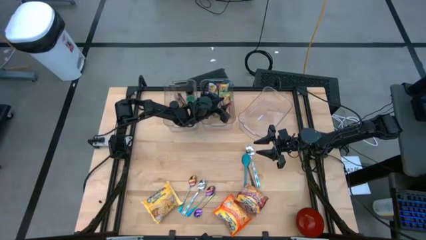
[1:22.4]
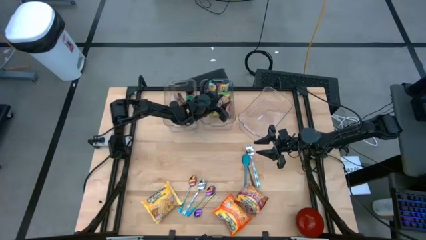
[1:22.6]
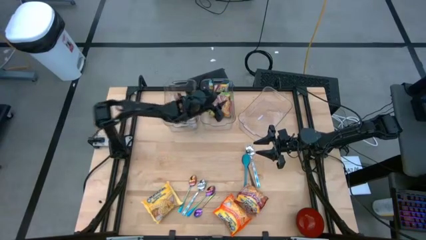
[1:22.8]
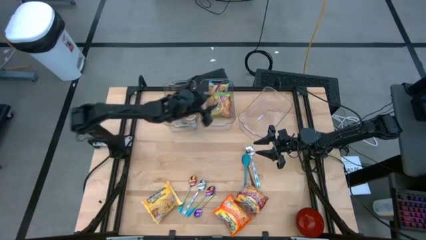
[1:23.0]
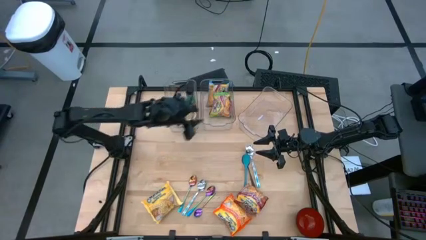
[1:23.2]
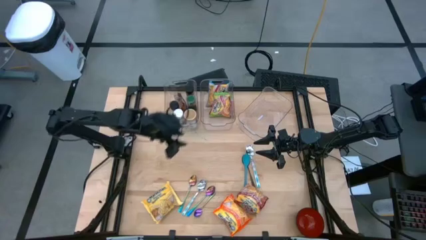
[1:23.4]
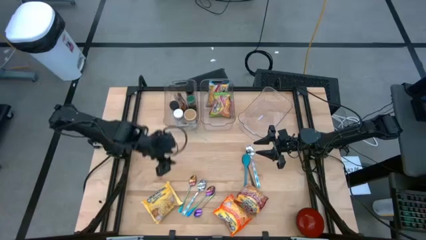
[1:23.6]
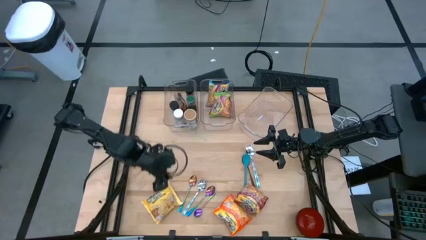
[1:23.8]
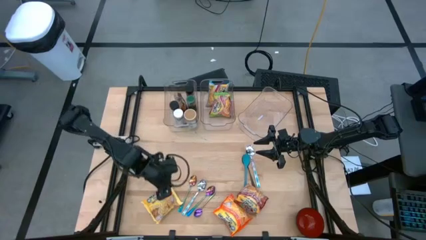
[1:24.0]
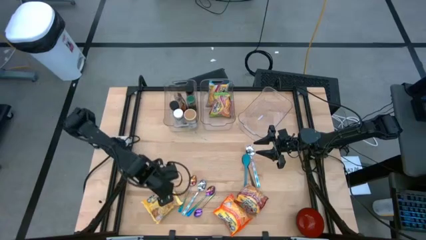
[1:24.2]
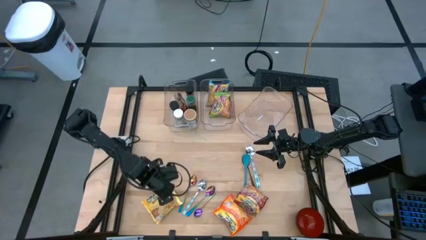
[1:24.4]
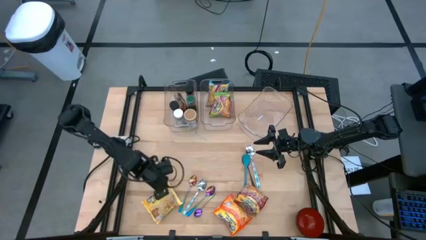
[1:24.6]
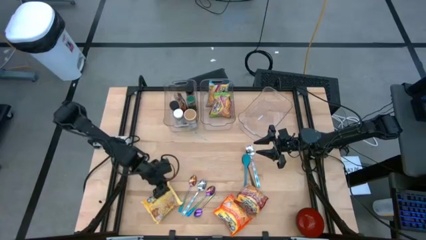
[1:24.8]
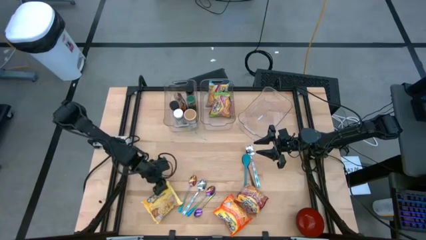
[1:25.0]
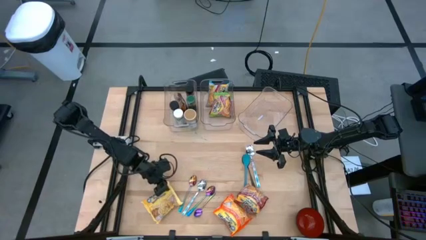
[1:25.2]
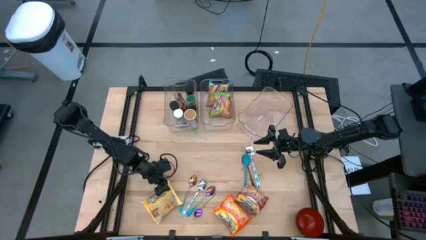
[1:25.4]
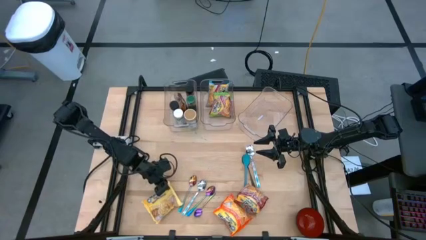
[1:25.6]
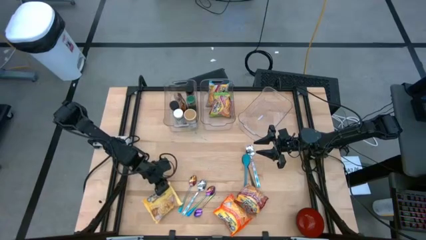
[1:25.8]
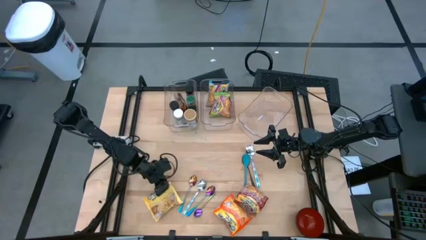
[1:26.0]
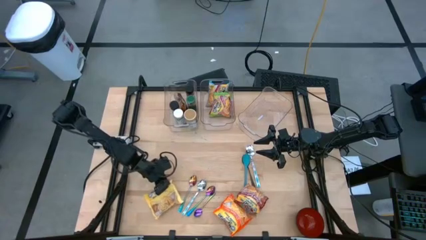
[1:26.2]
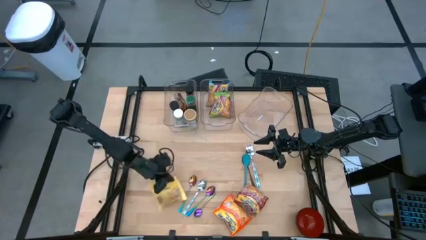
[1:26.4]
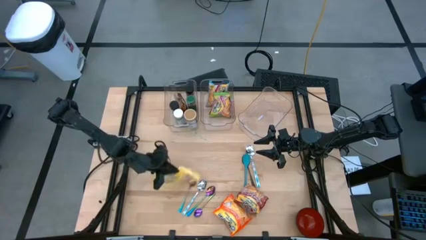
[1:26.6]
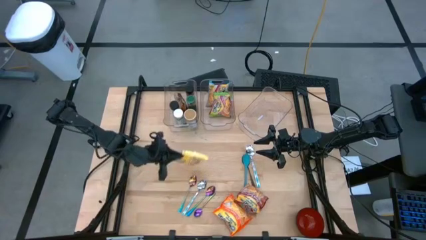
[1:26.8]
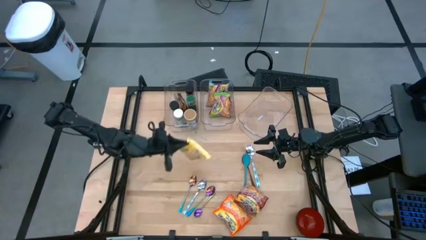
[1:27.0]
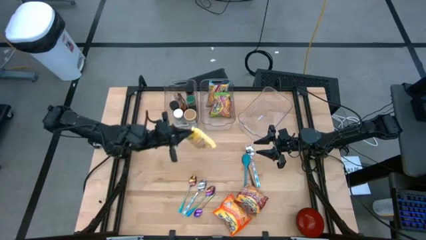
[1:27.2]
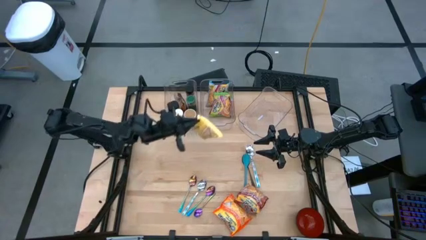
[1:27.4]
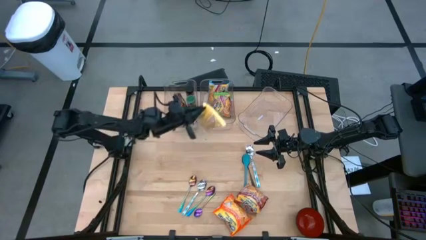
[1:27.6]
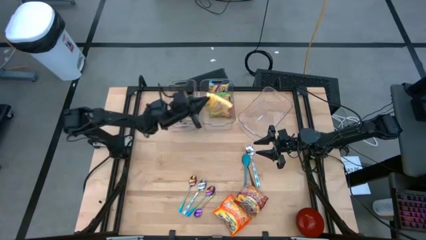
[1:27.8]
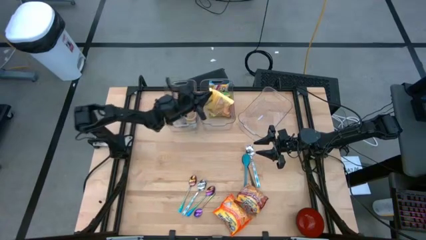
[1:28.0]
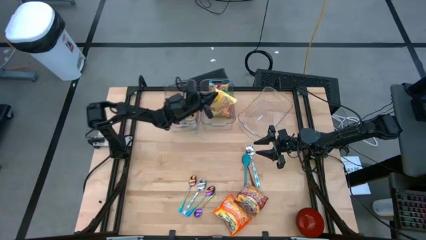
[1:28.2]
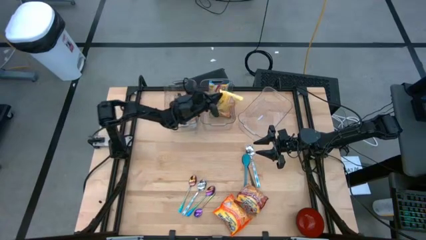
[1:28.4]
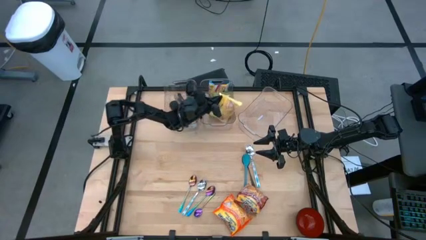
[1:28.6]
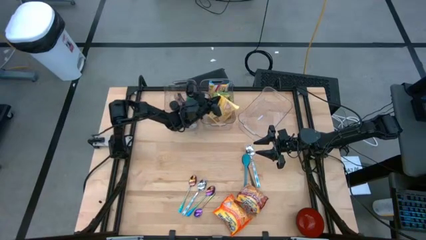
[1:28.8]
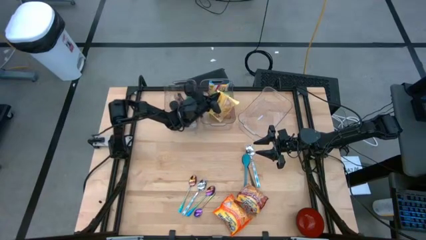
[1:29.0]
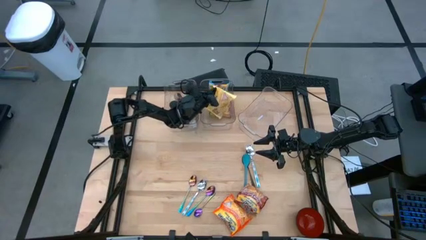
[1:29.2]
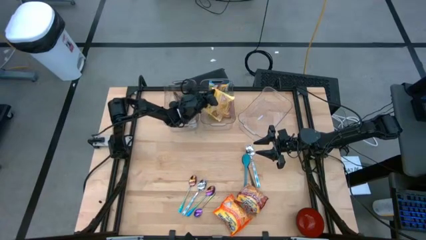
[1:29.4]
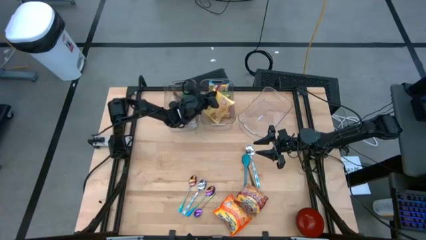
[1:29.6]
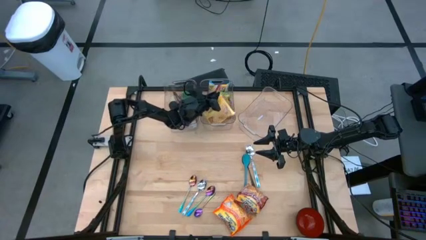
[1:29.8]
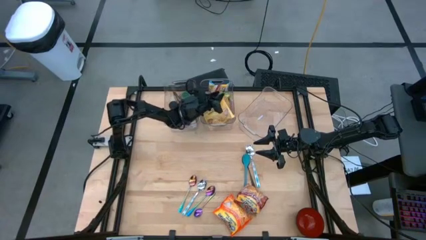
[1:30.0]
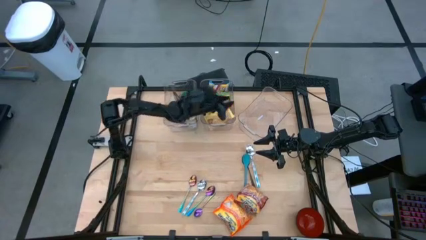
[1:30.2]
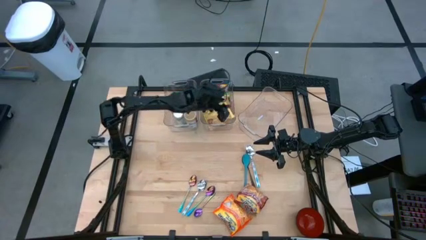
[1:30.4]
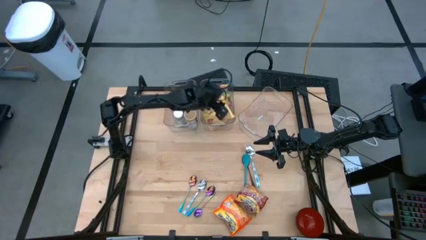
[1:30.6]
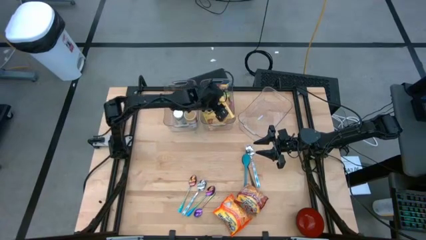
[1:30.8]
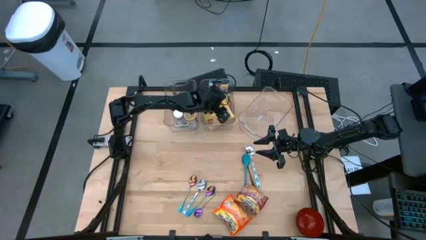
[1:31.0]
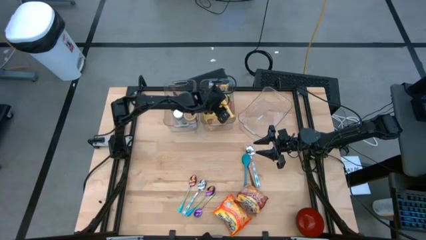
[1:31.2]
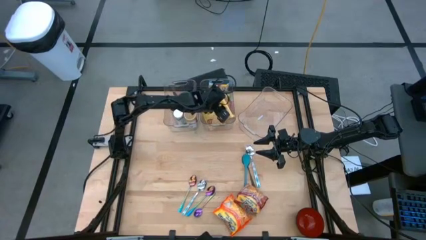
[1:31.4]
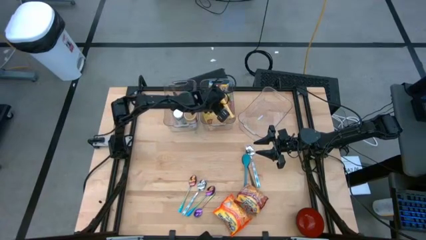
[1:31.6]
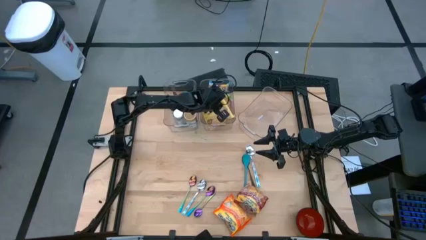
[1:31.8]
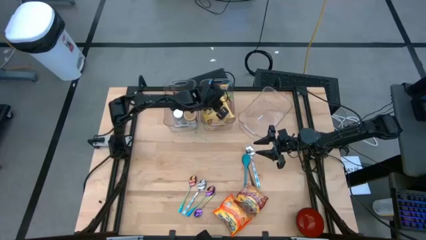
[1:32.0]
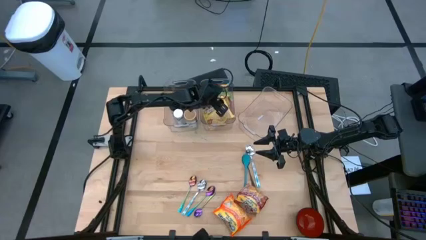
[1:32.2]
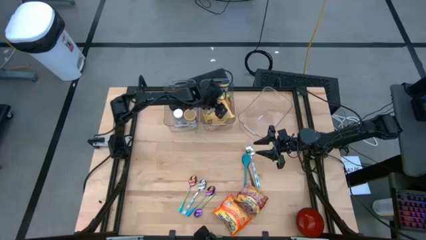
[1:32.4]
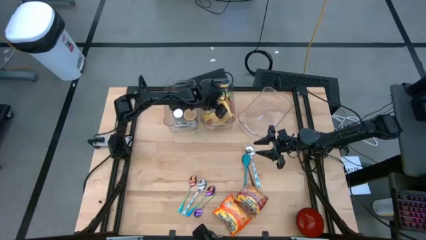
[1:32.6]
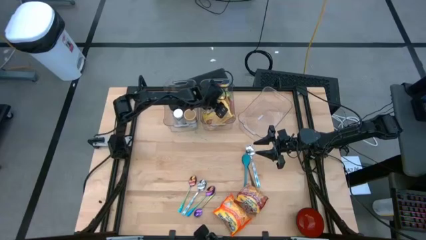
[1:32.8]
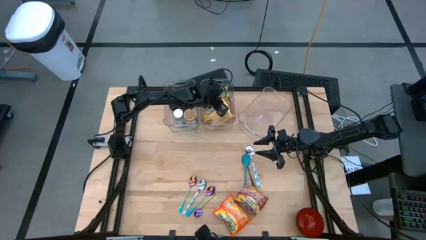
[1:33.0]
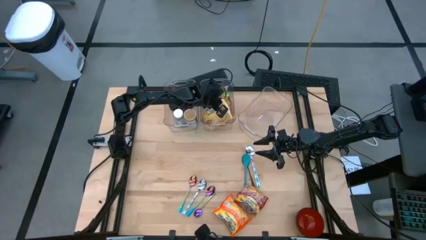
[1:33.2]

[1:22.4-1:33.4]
Task: Pick & Place Food Item
Put the yellow noodle pack into the middle transparent bin

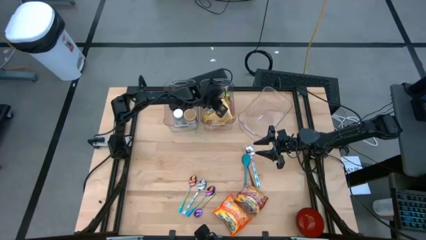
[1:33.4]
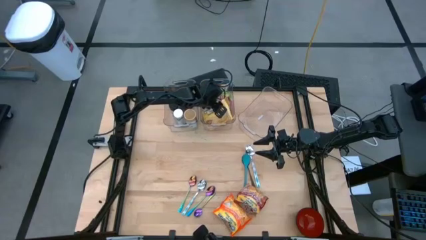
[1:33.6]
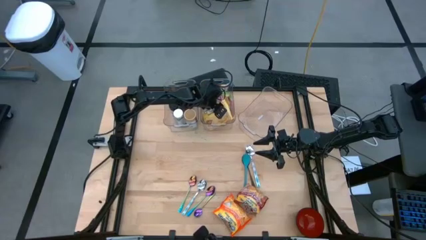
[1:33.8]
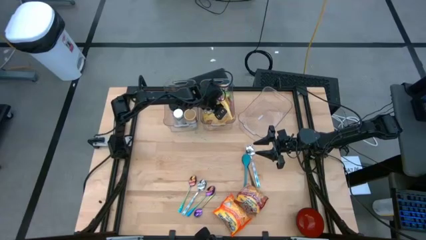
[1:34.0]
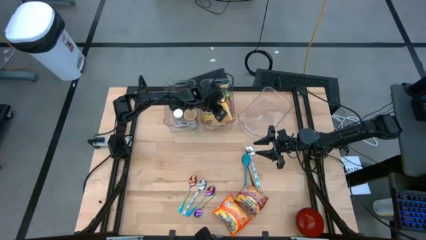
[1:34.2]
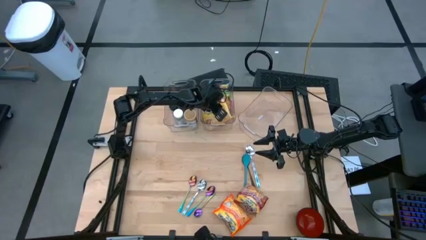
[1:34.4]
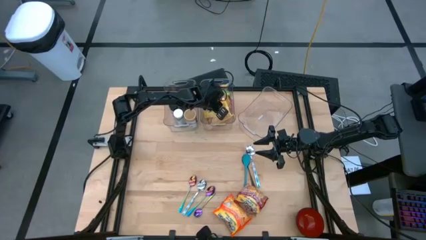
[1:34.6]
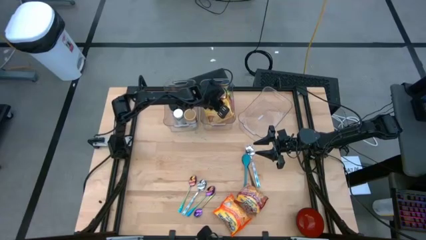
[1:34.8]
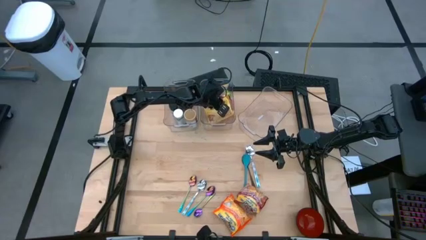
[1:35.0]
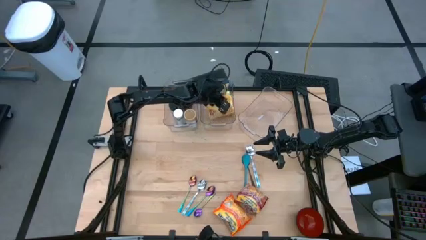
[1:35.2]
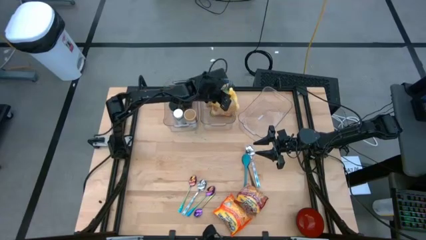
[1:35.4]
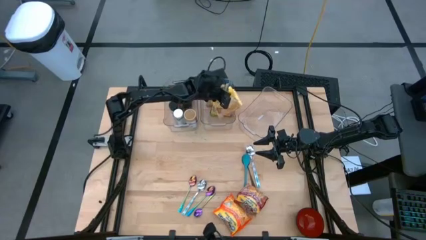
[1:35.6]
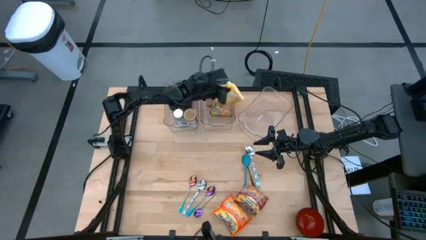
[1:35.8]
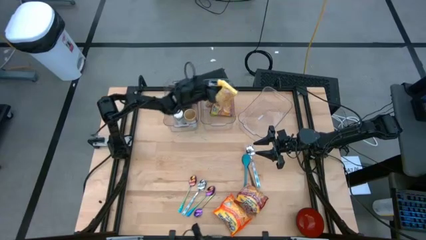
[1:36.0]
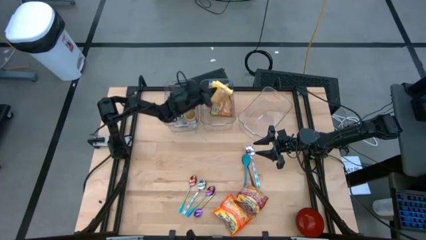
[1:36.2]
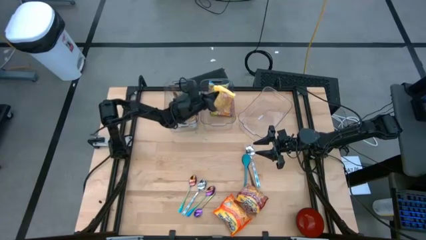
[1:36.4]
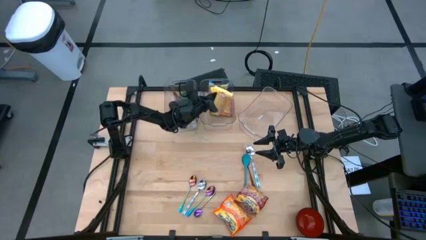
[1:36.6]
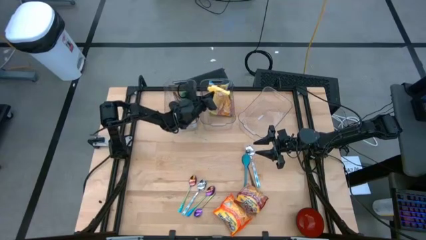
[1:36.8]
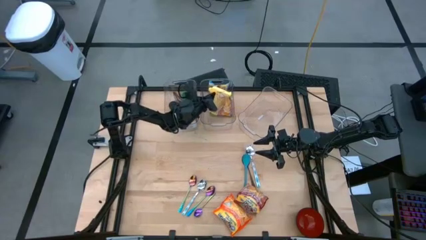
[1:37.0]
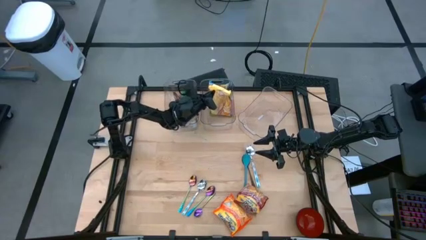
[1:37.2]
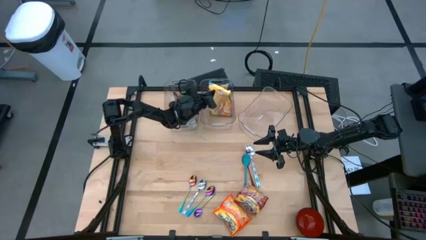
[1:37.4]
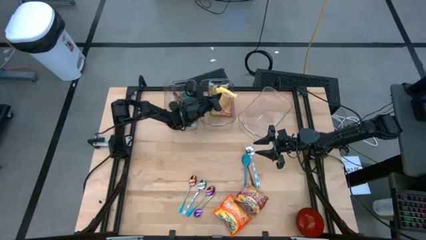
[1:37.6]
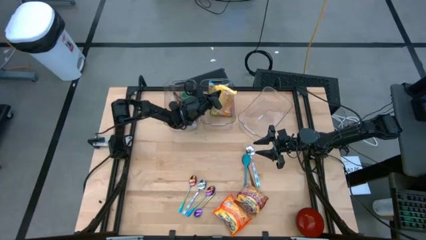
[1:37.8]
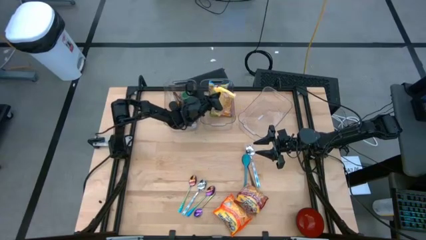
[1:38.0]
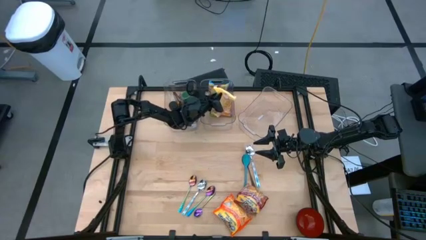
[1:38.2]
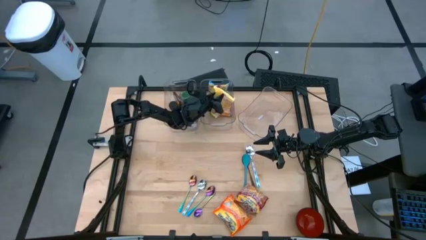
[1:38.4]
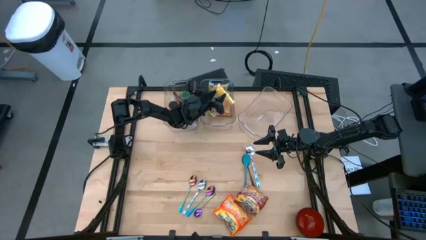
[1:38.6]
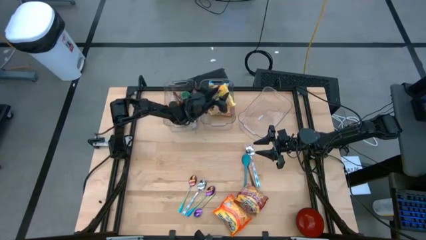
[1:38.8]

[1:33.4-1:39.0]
Put the yellow noodle pack into the middle transparent bin
